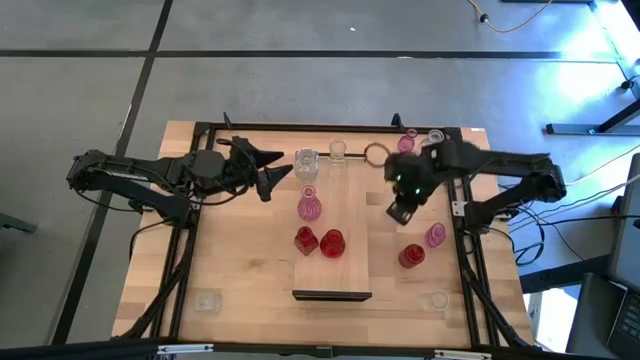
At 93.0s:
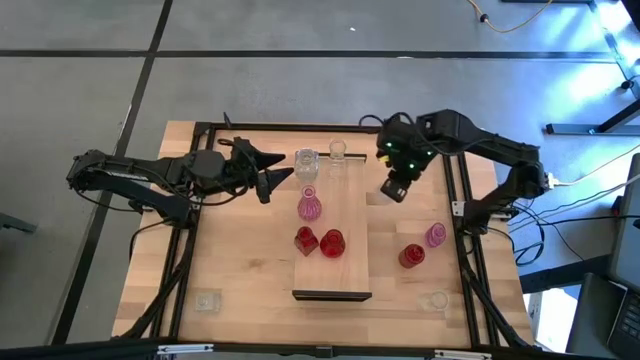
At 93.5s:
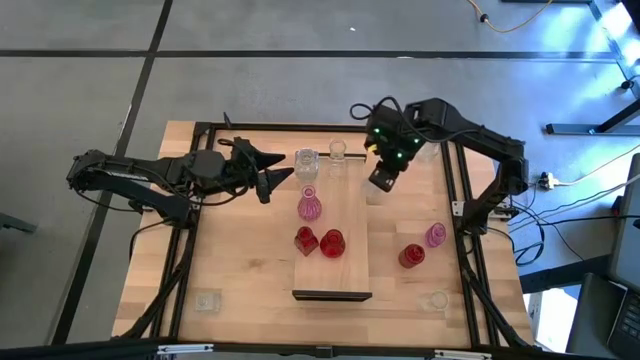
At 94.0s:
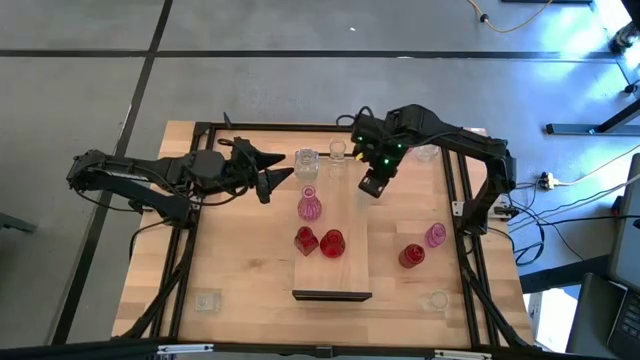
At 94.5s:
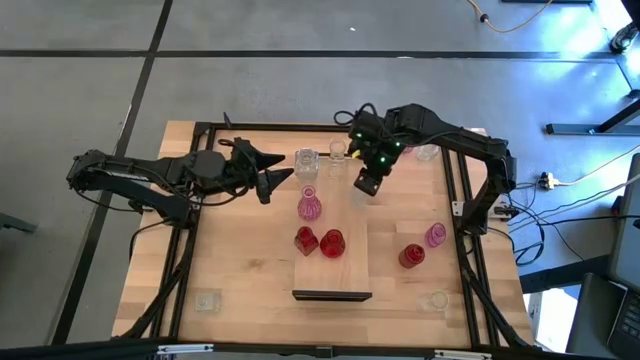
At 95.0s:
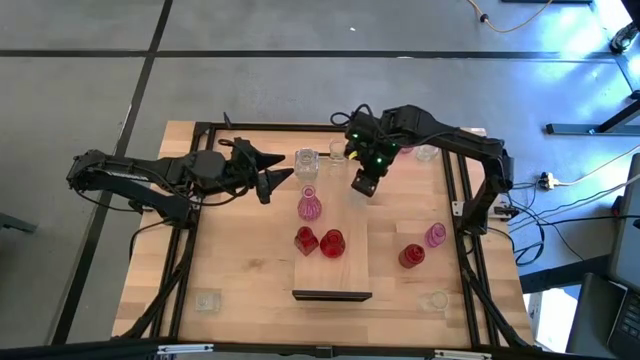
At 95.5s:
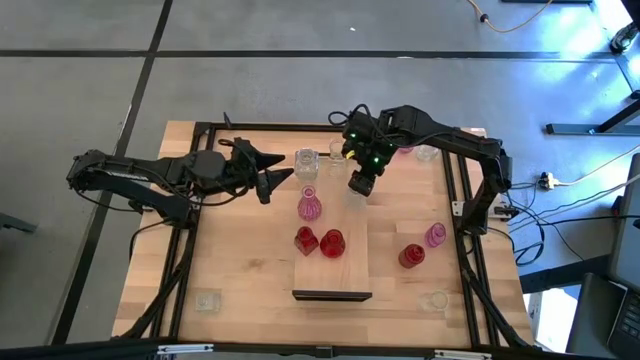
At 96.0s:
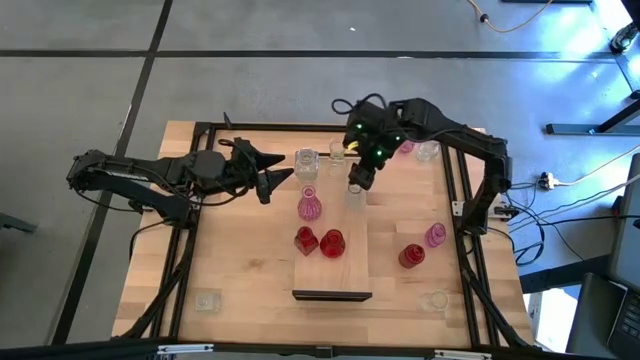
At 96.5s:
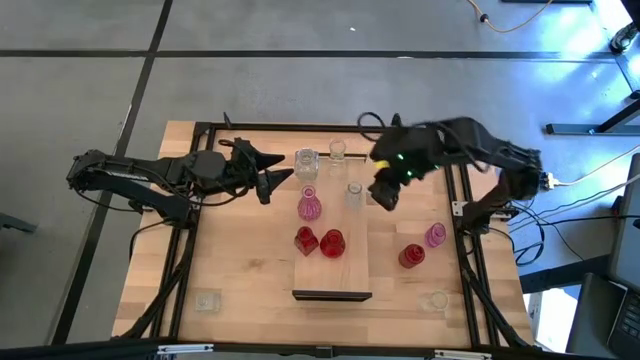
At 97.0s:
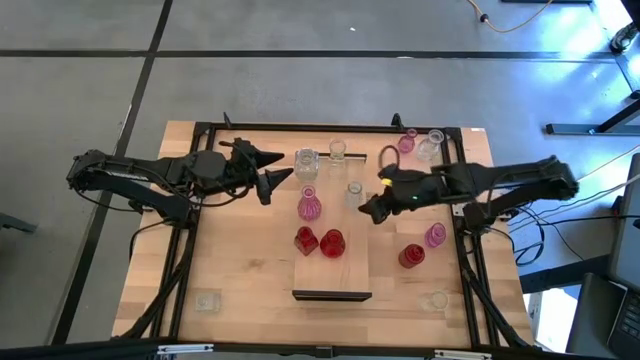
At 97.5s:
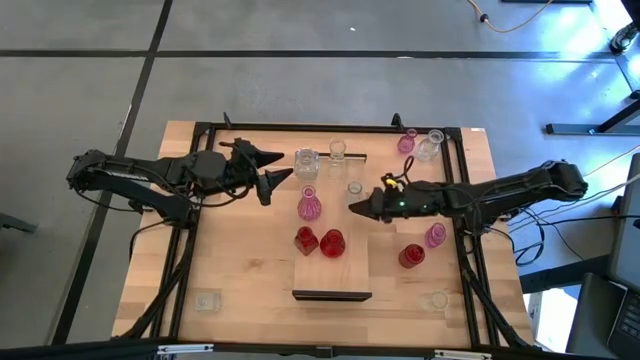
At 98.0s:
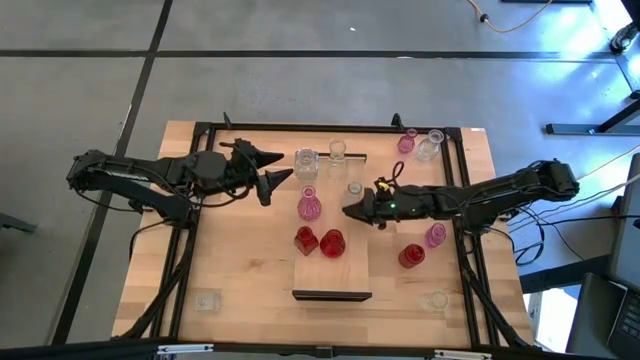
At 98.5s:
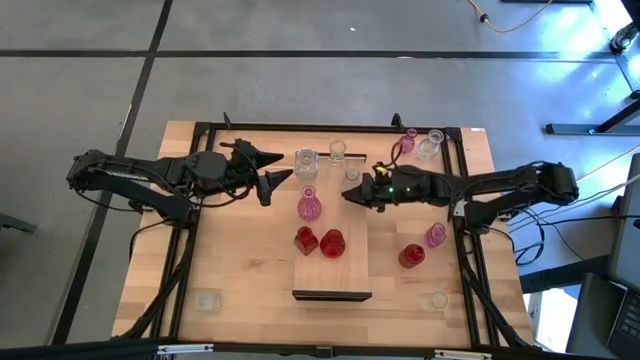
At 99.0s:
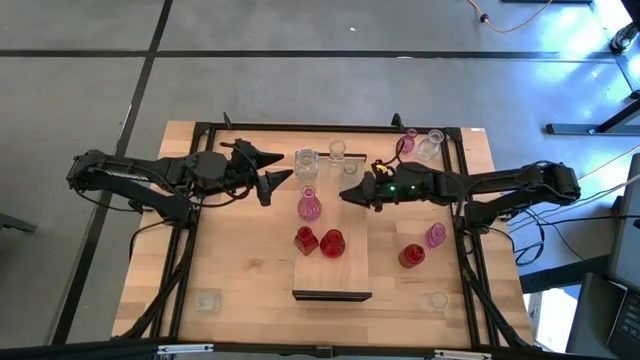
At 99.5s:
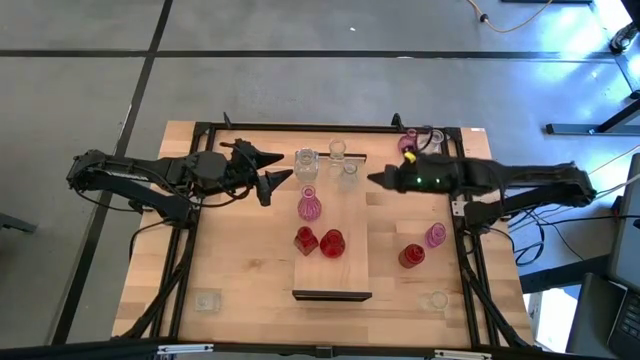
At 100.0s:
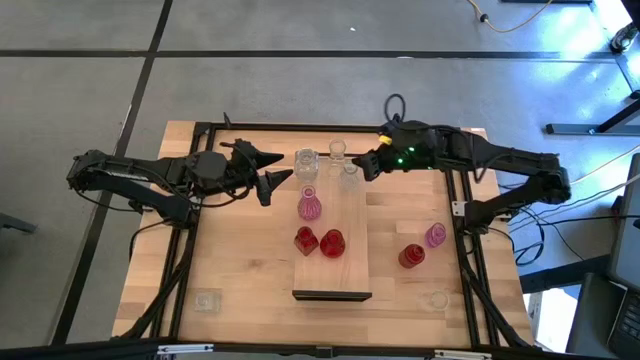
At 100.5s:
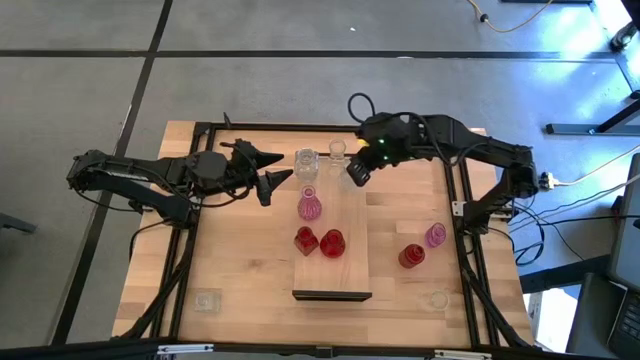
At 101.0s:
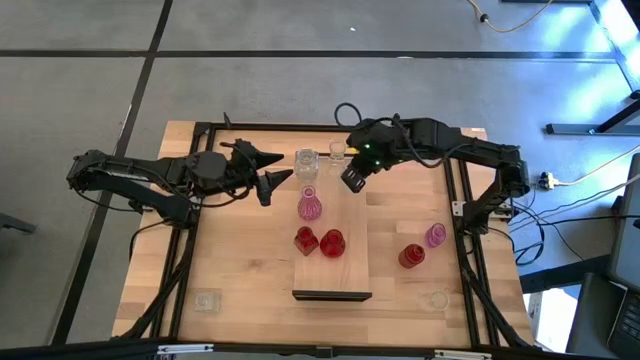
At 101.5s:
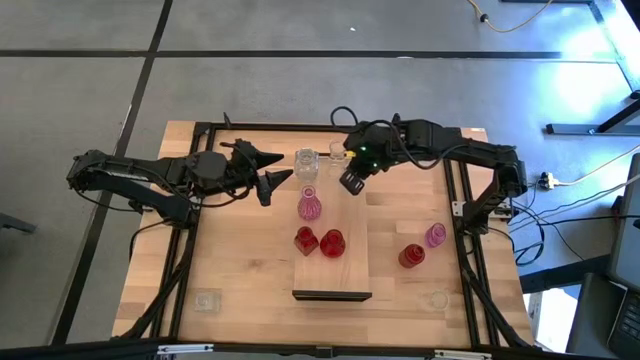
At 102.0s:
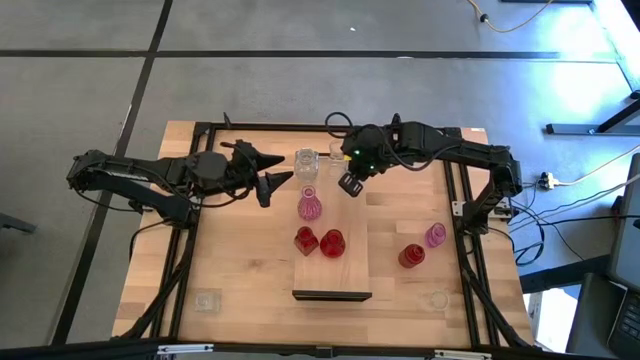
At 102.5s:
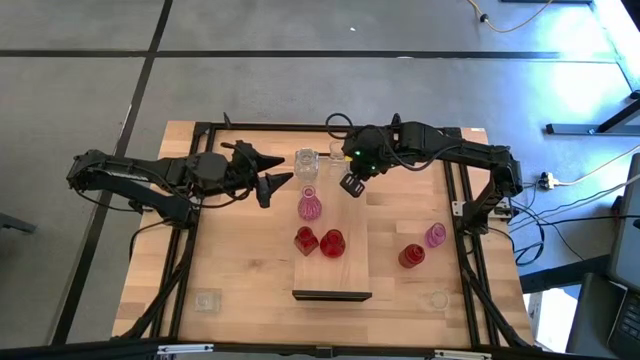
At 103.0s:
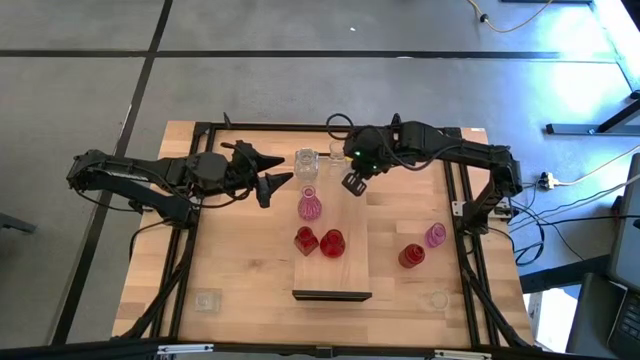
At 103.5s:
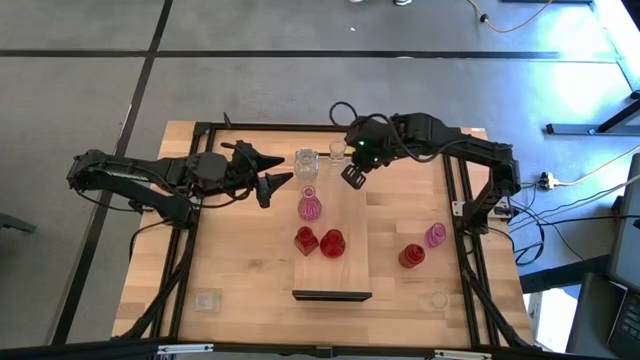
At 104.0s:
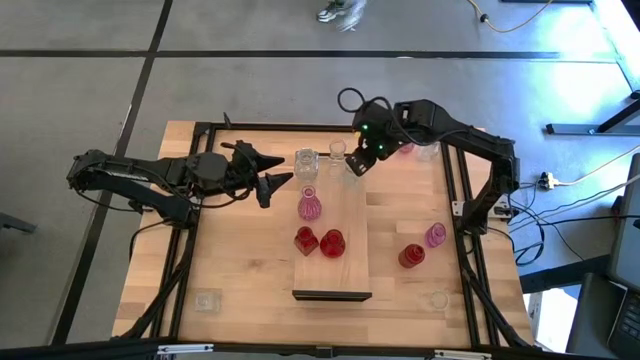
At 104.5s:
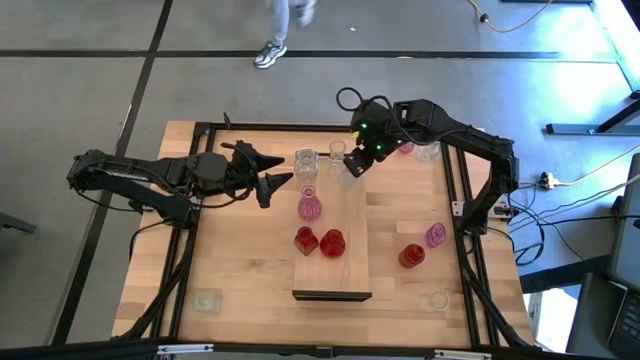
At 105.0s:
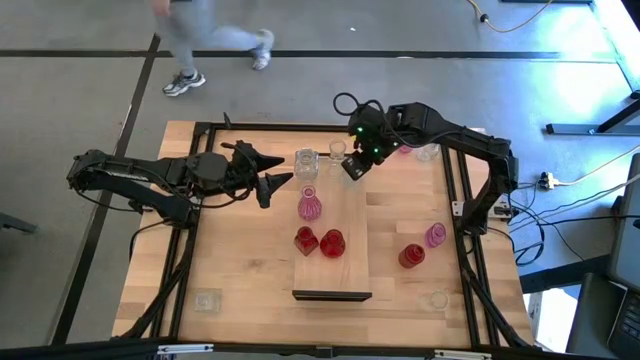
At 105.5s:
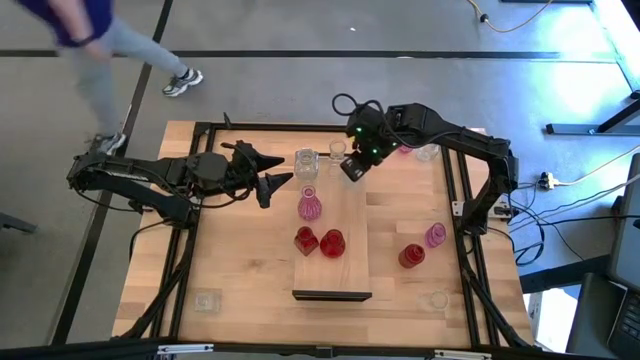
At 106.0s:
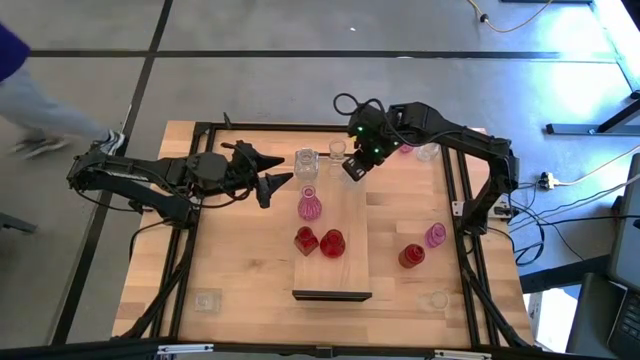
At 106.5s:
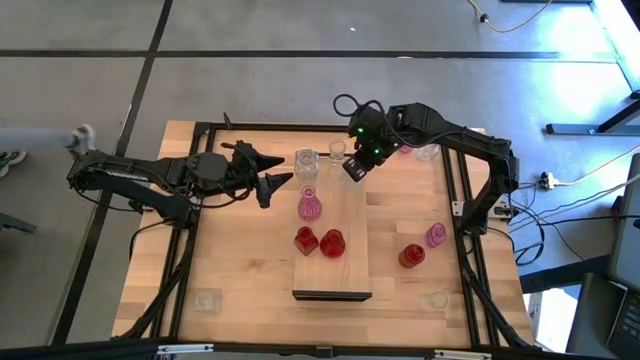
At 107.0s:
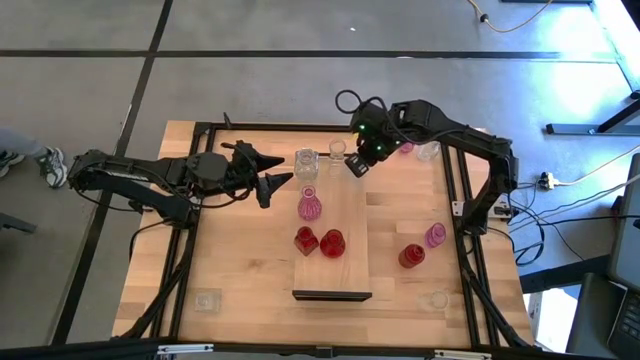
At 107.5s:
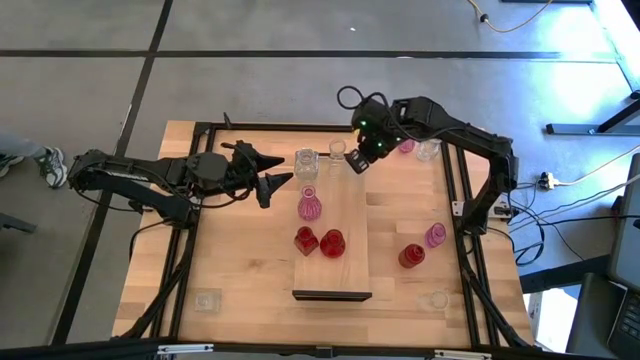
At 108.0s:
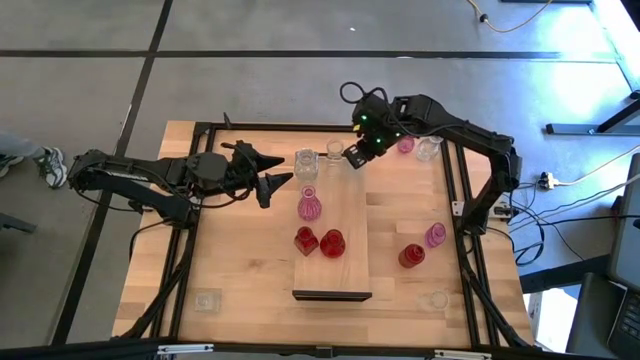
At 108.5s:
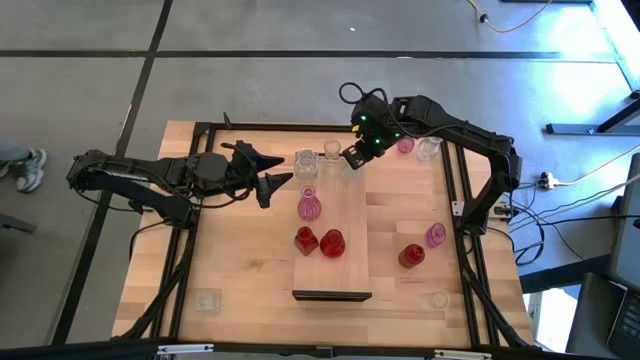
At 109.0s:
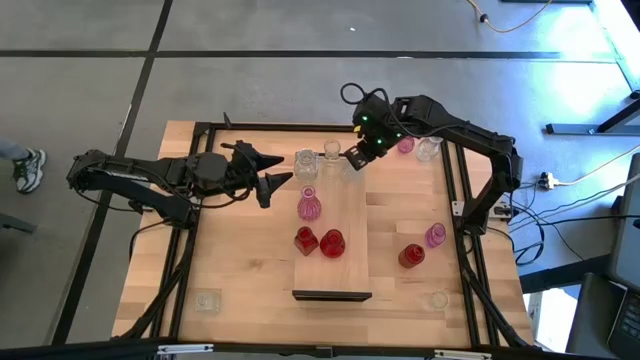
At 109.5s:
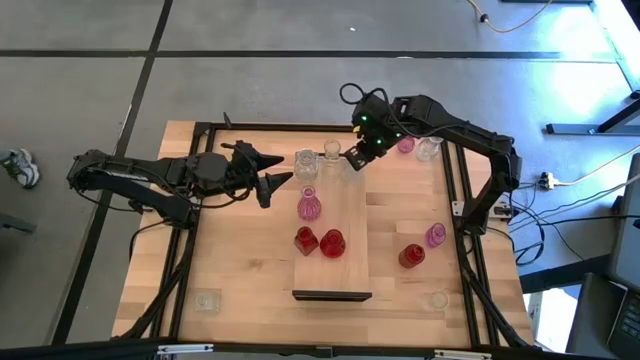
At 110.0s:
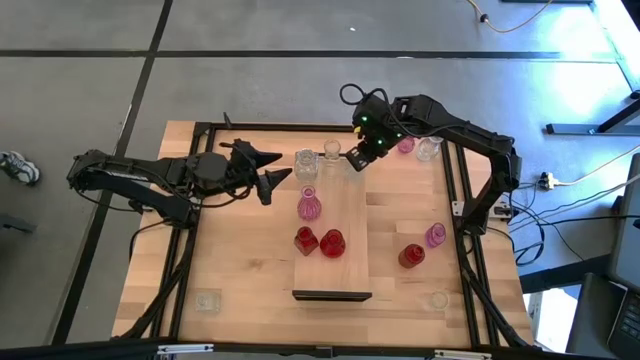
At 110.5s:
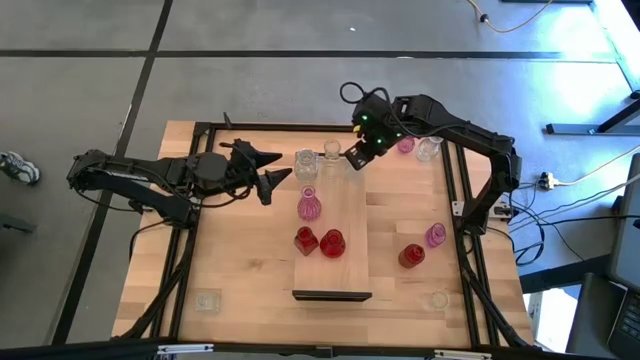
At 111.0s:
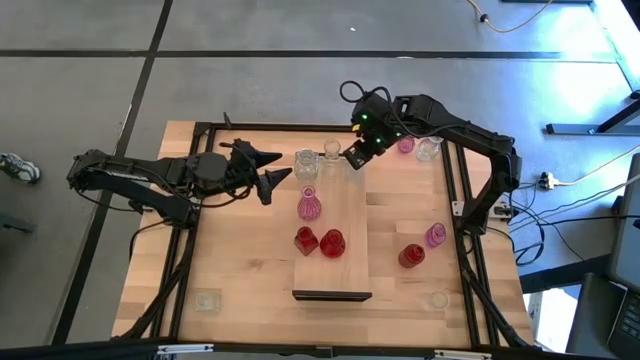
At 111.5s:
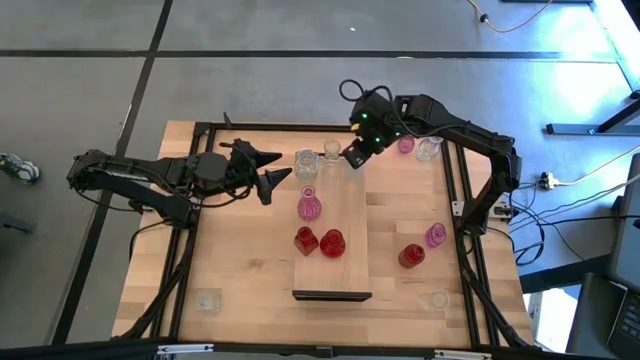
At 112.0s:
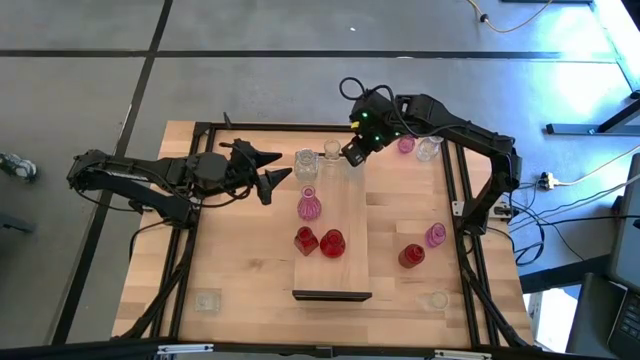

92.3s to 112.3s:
Task: sort vases onto shelf
Put the transparent vase on the shelf aligned with the other transparent vases
